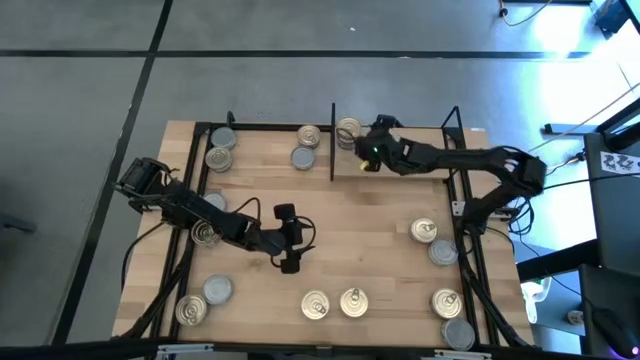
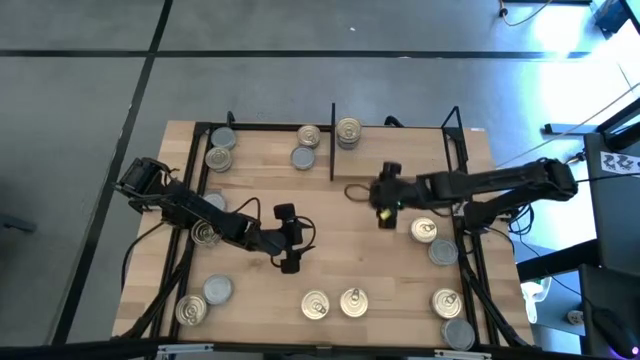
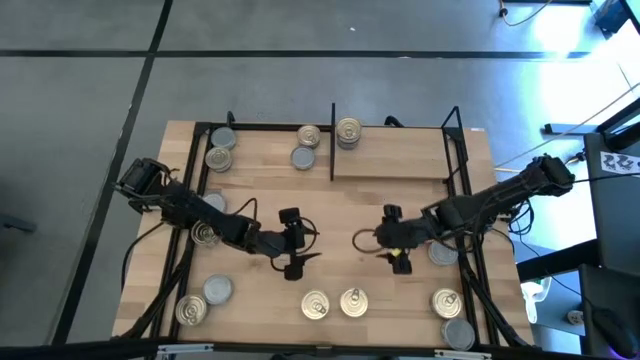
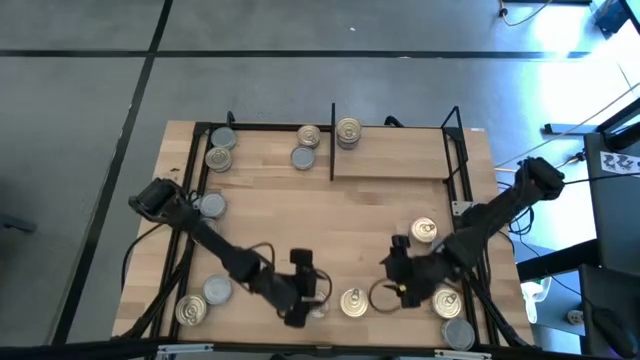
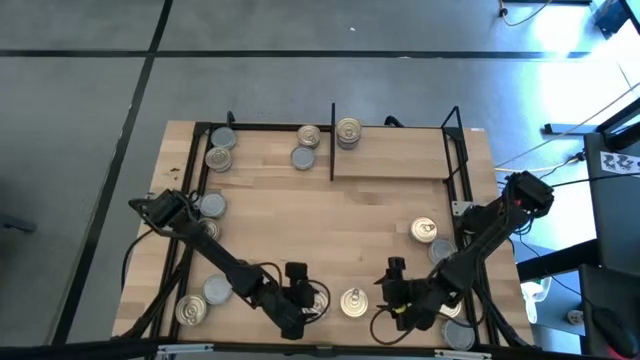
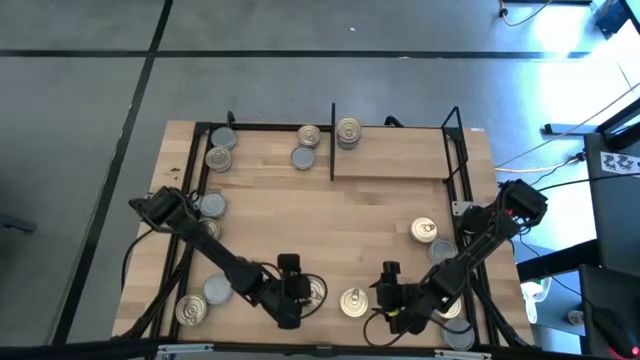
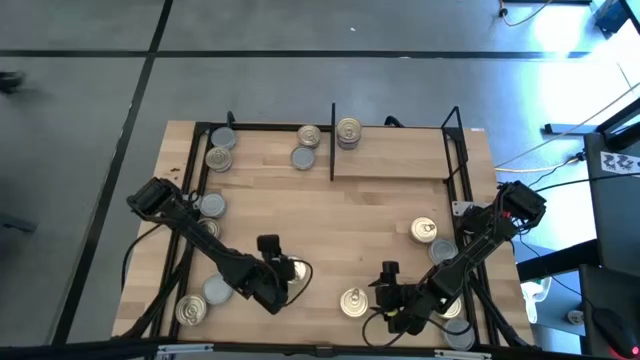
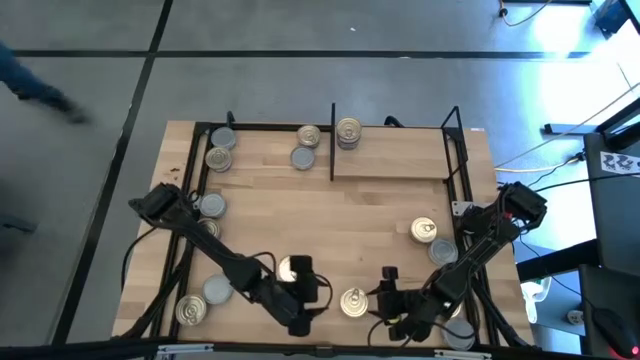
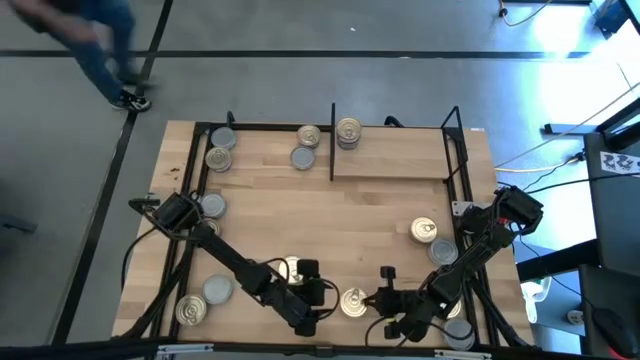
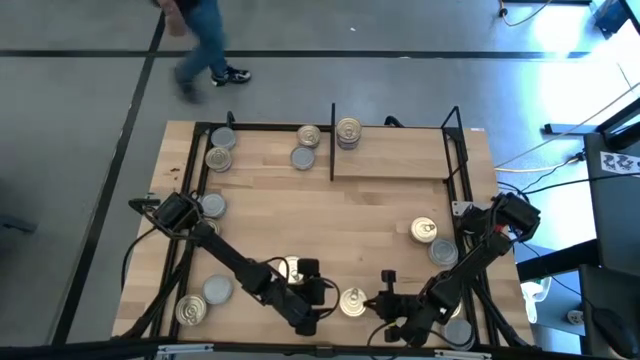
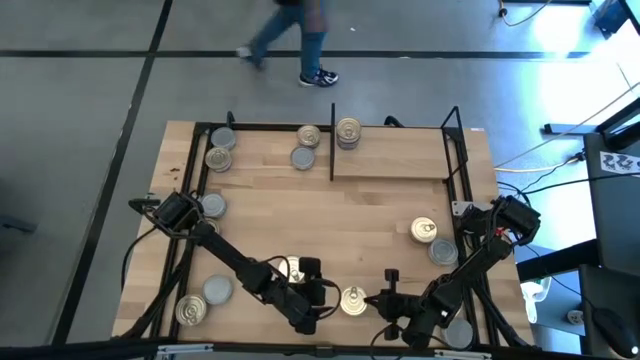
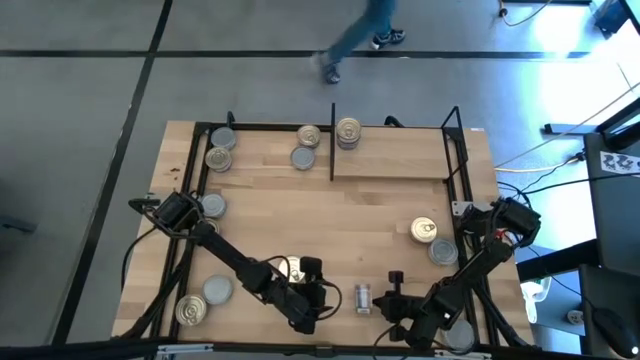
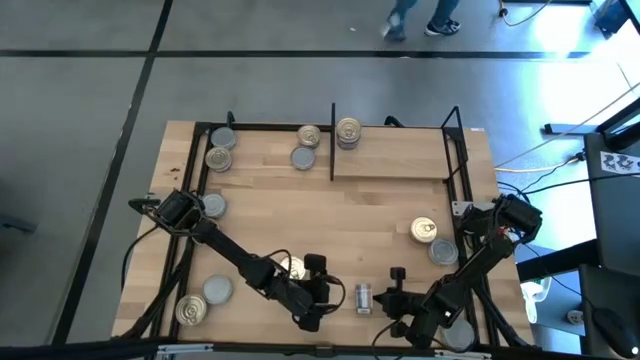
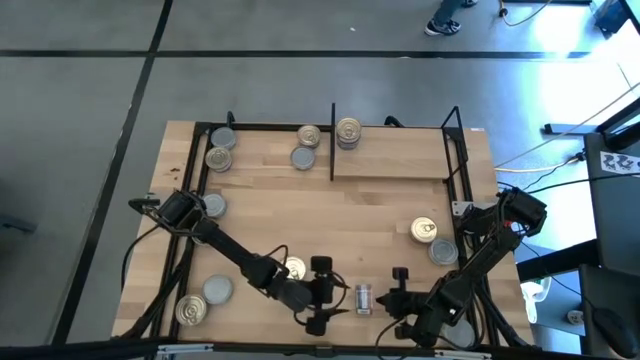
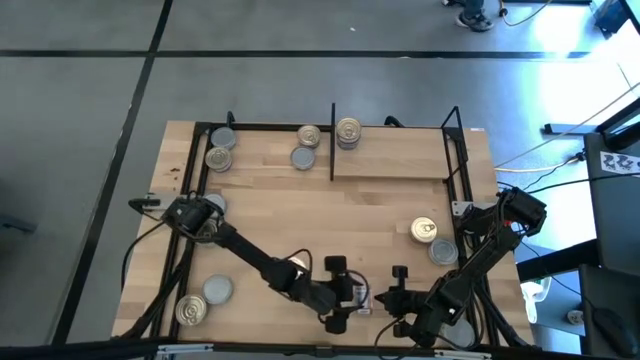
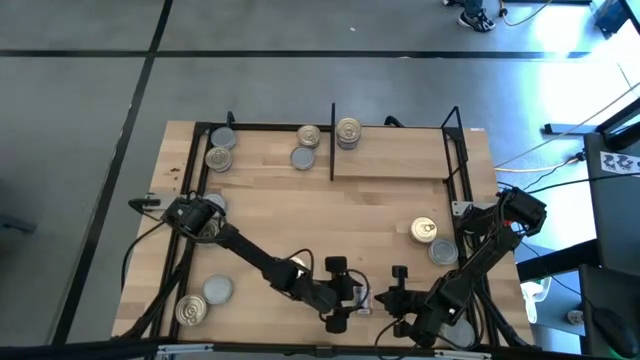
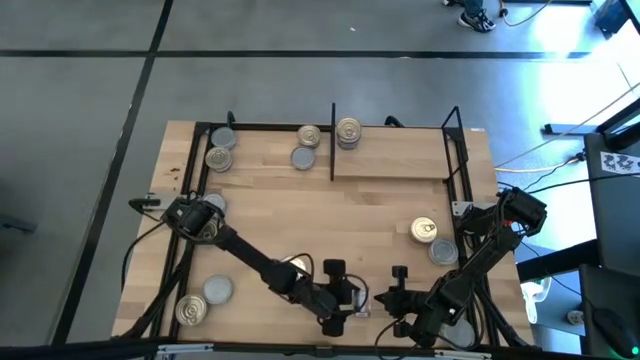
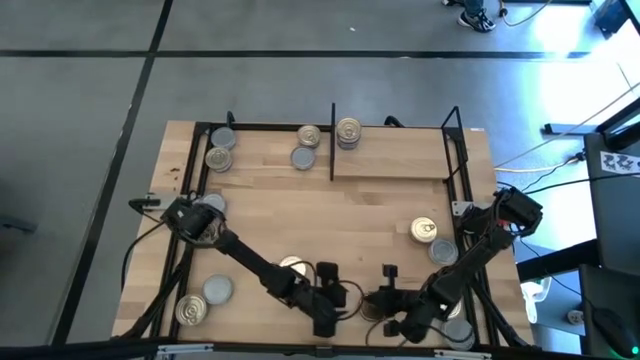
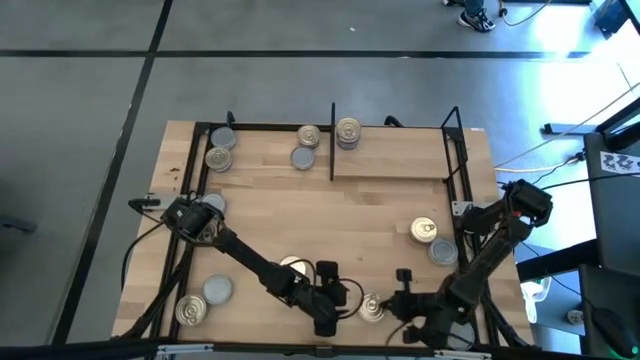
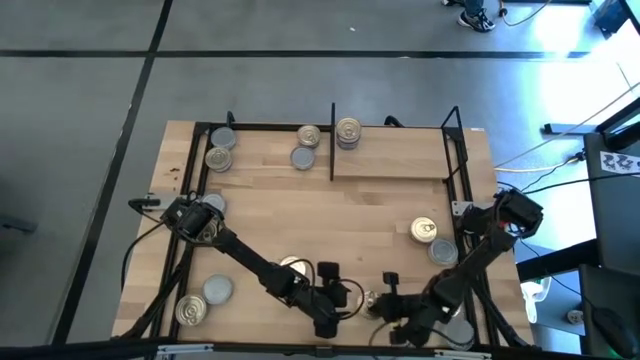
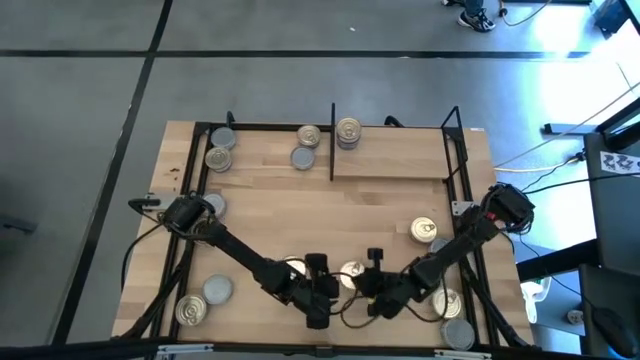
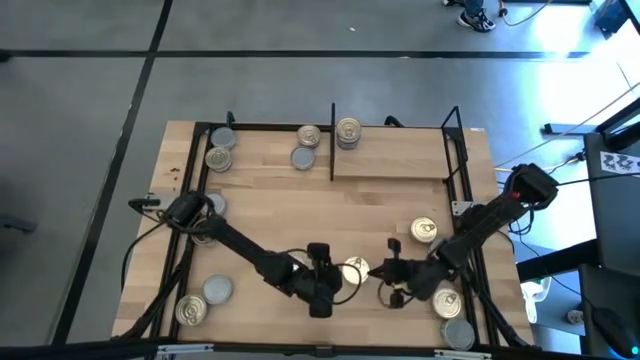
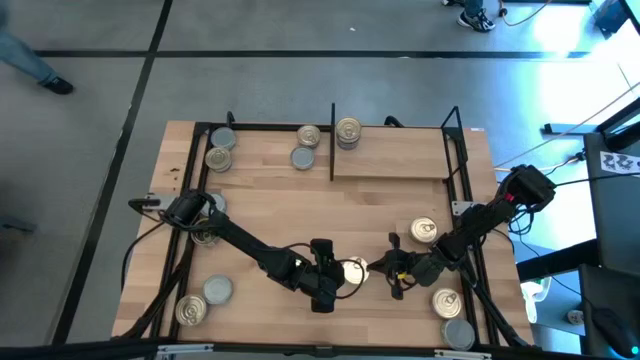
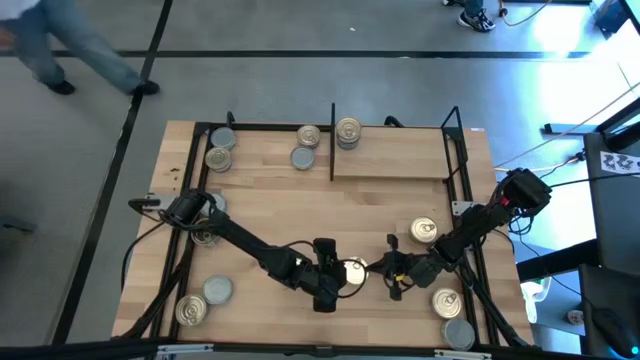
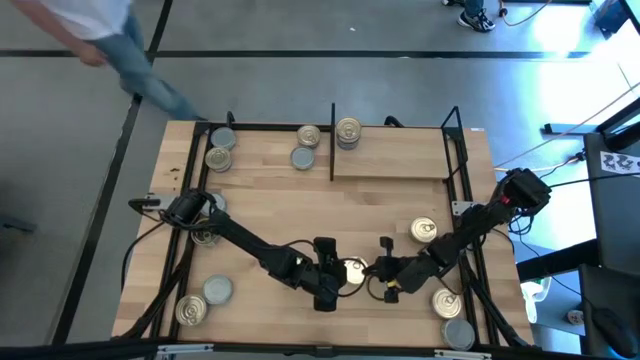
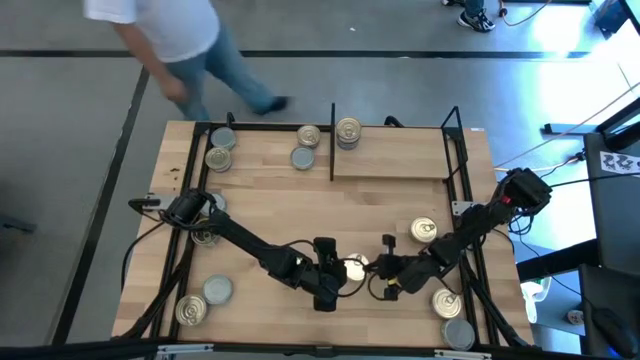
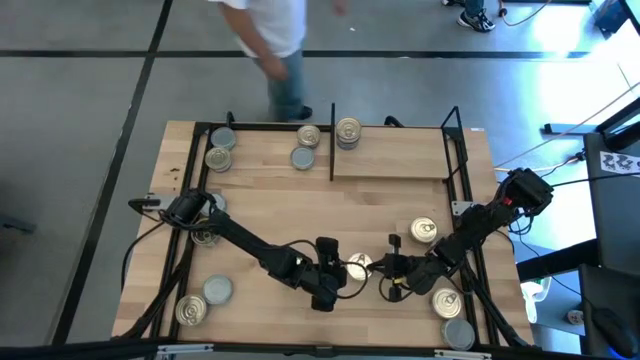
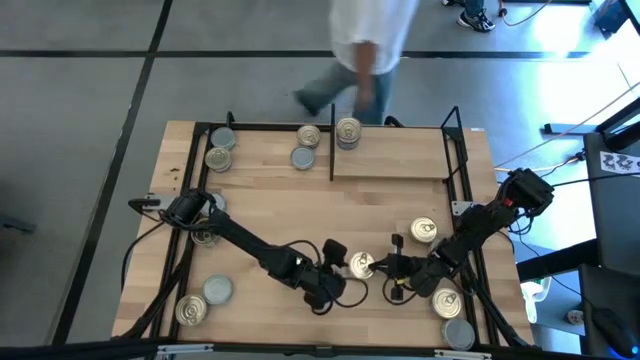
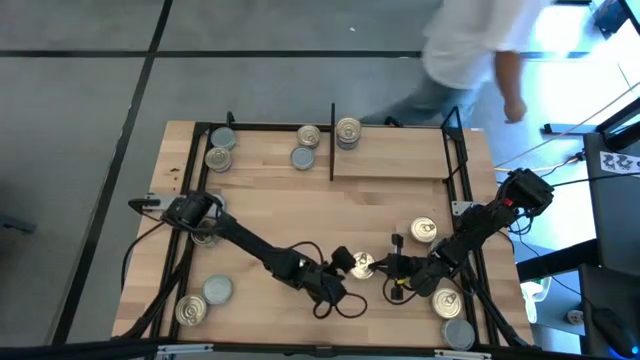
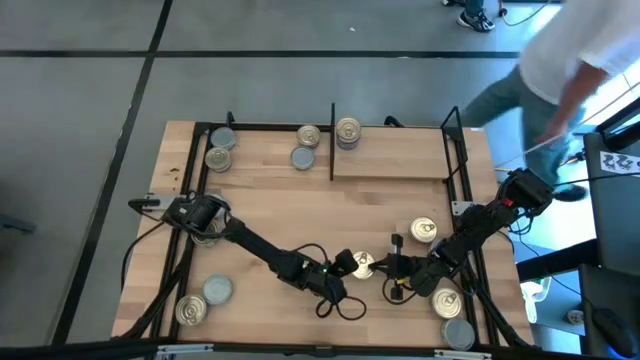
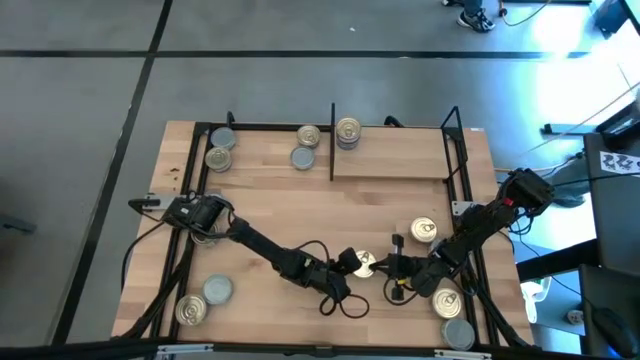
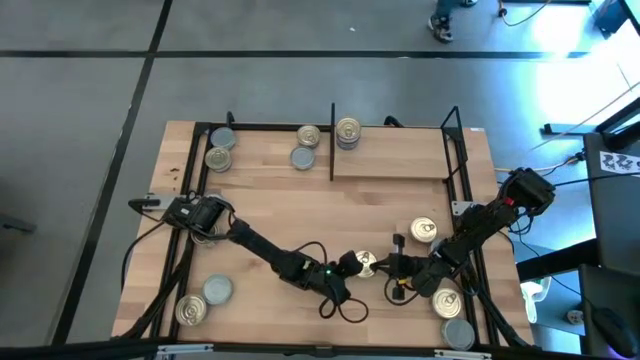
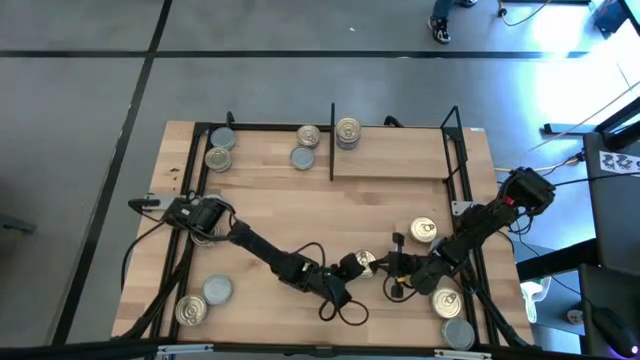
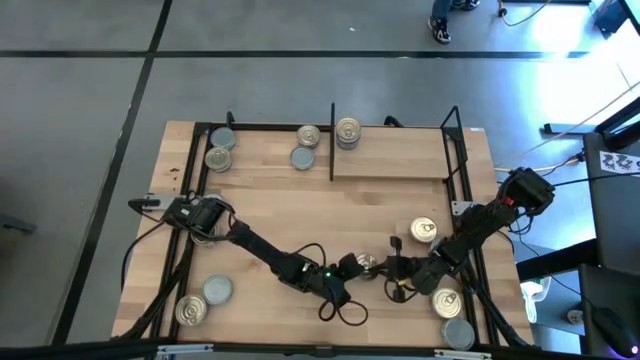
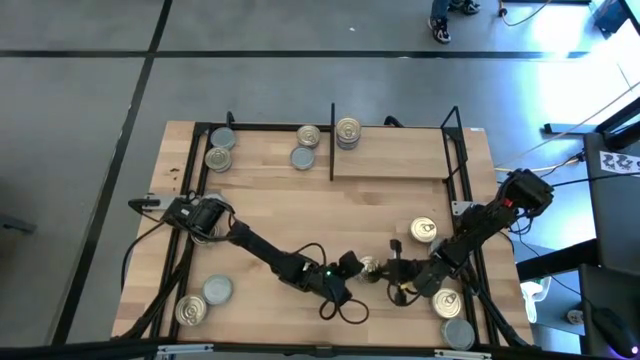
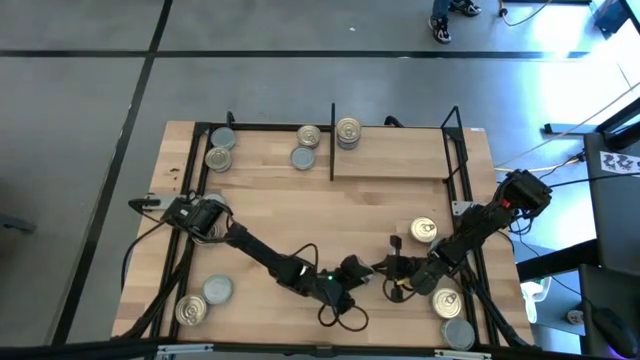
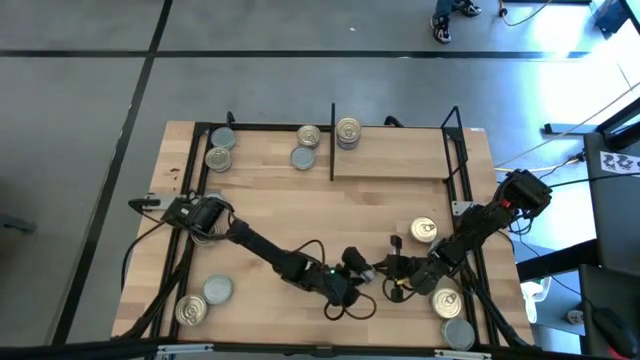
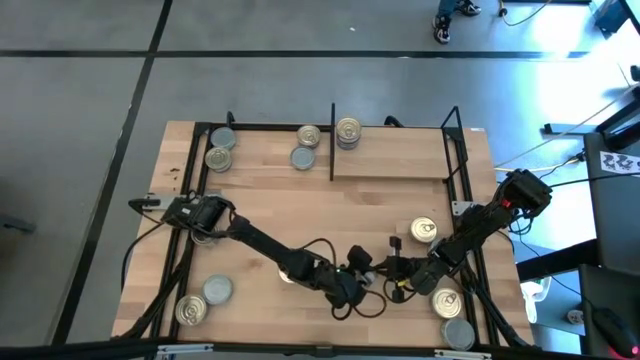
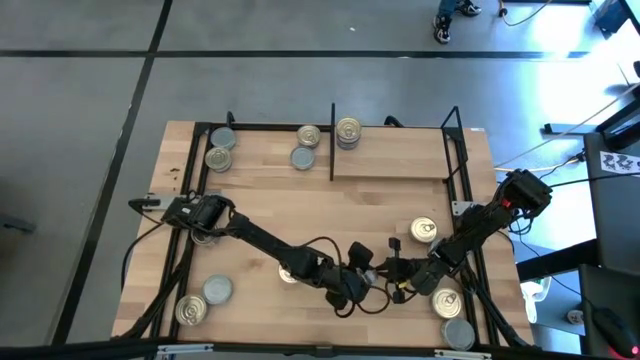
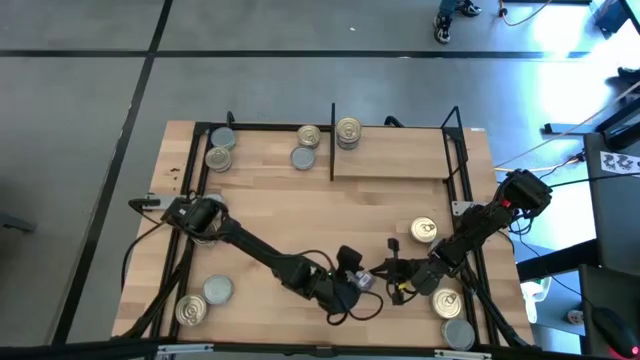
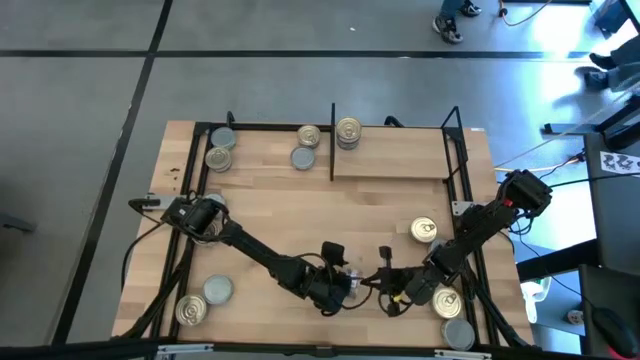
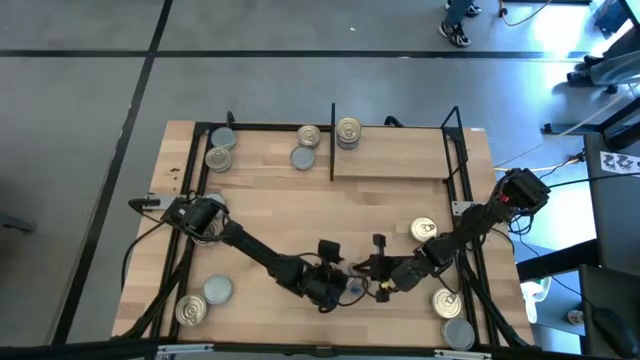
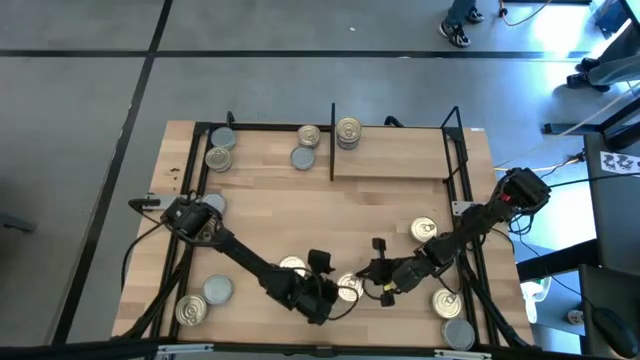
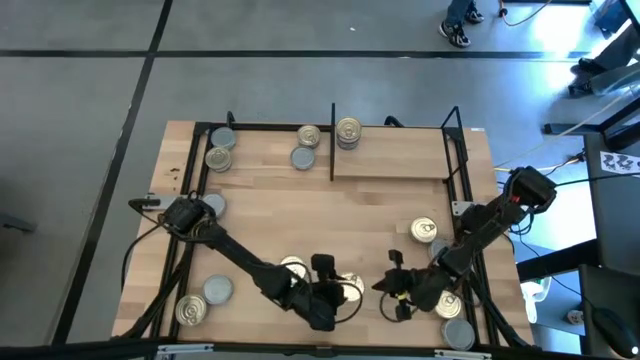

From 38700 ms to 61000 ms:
Task: Stack canned seafood by type on shelf
Put the blue tuna can on the shelf
